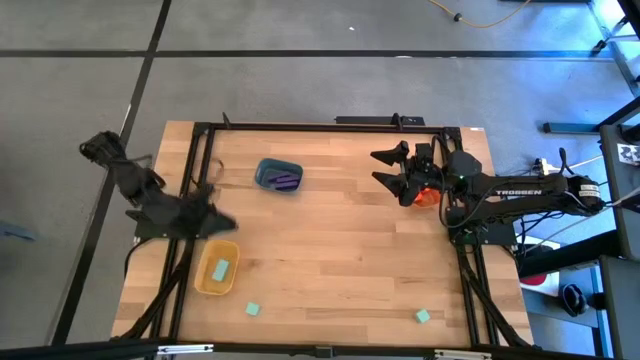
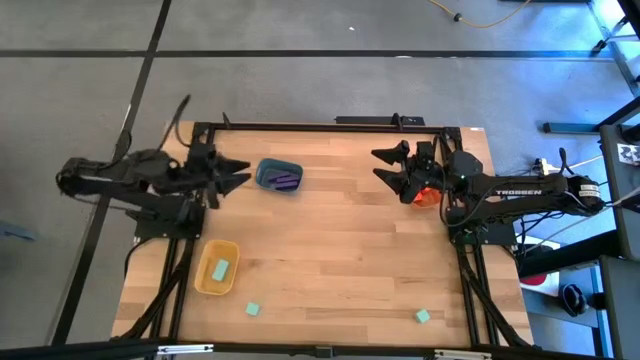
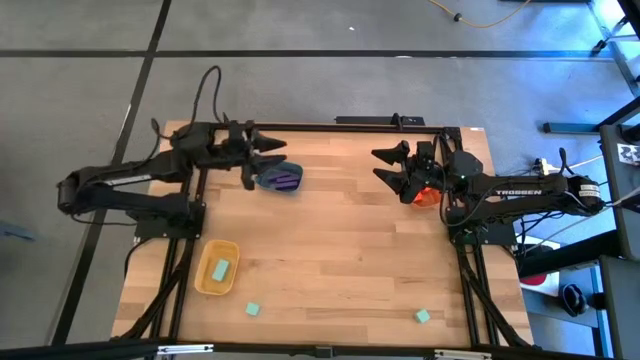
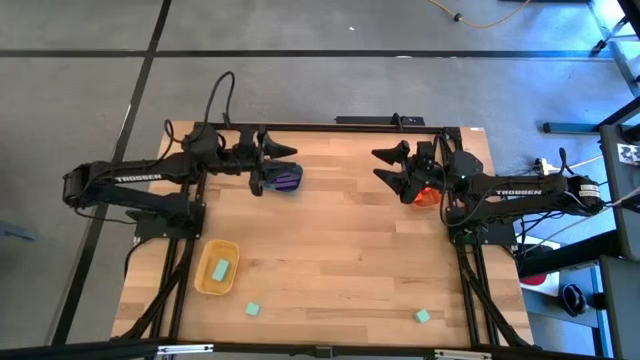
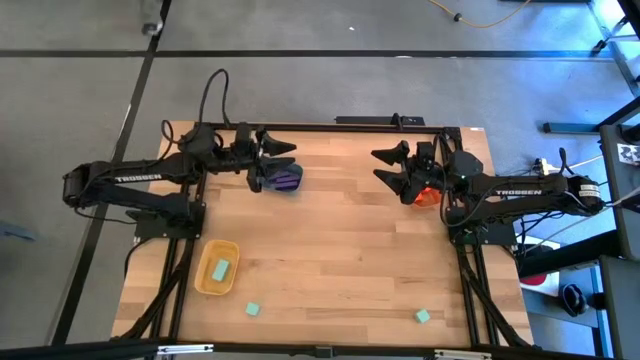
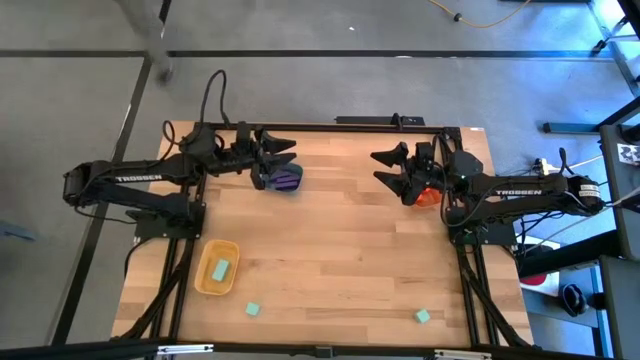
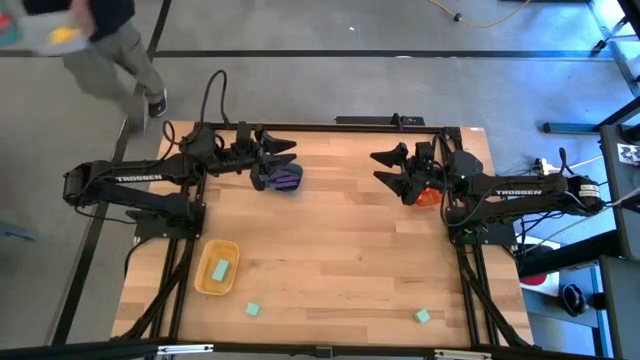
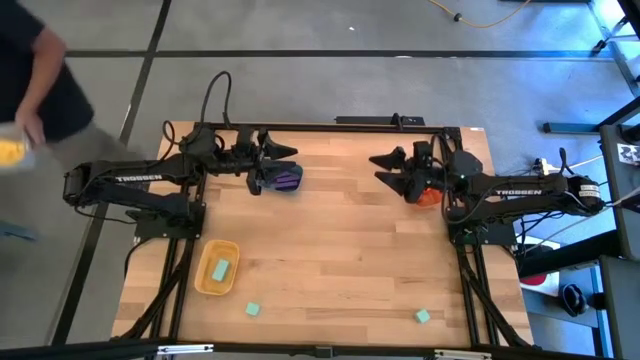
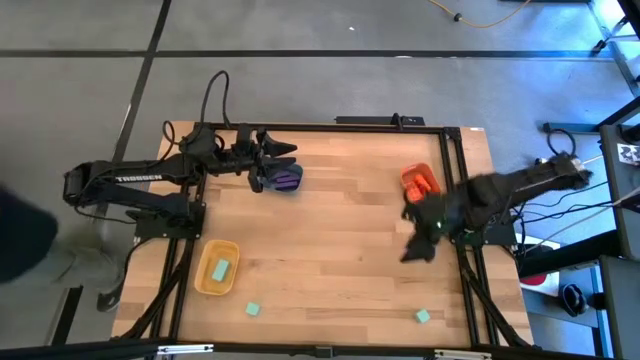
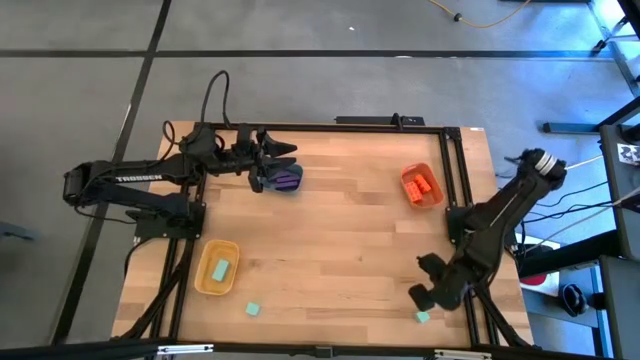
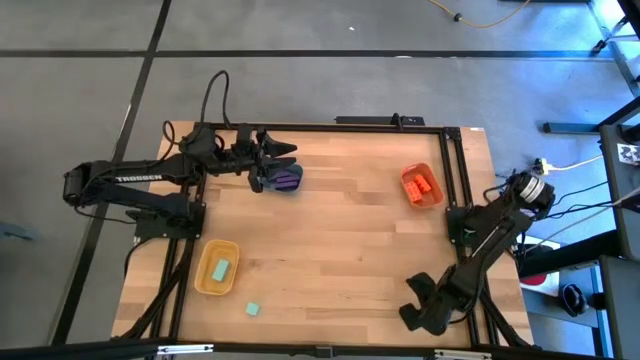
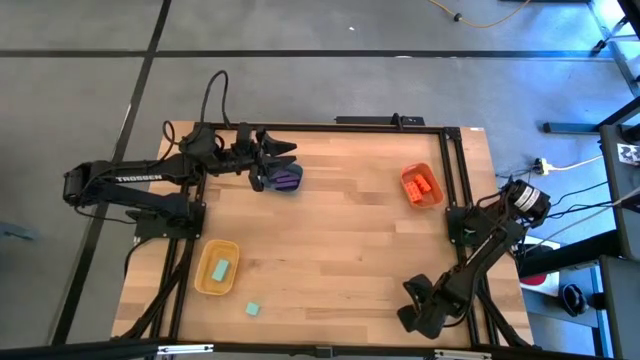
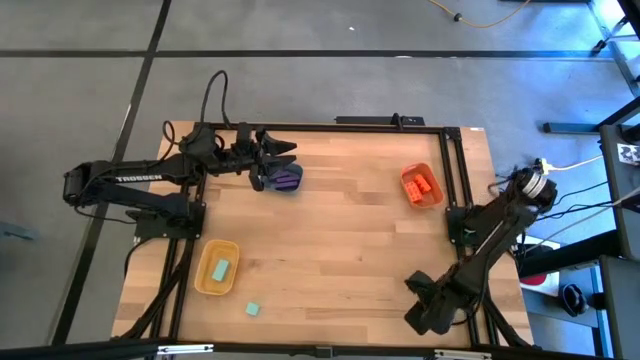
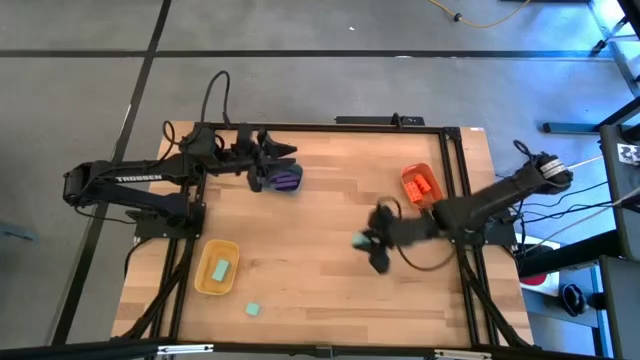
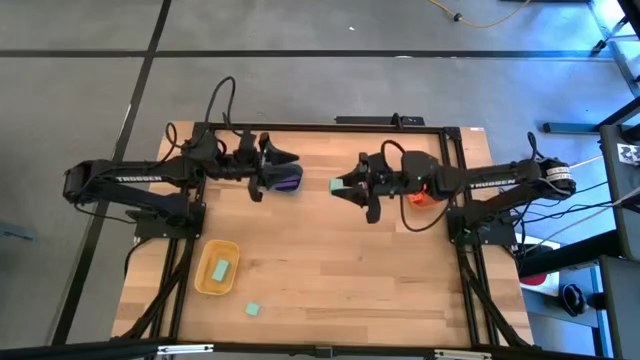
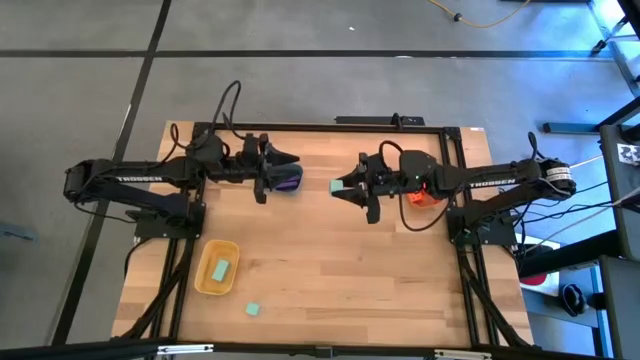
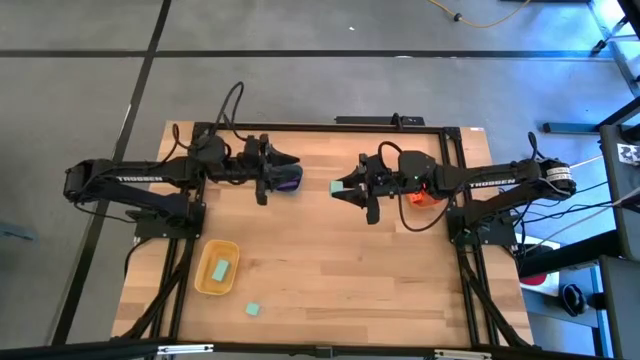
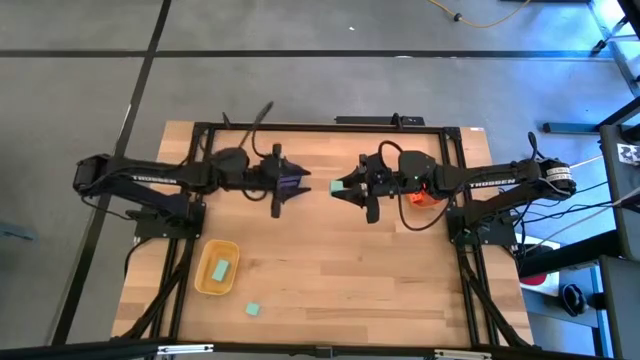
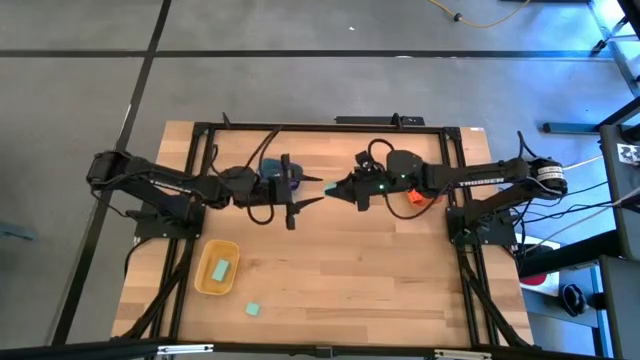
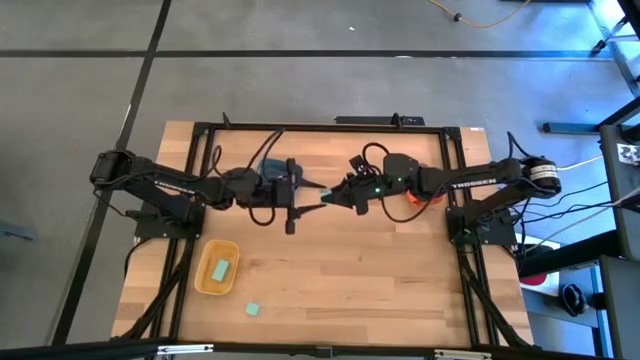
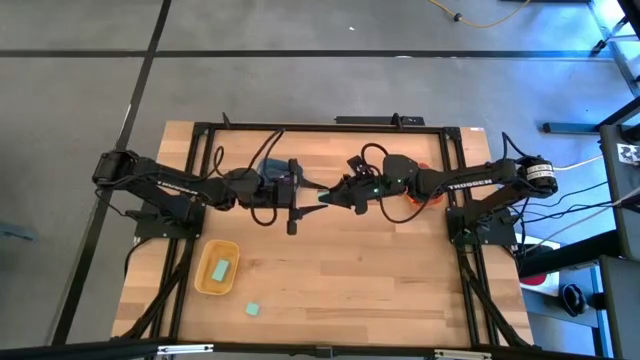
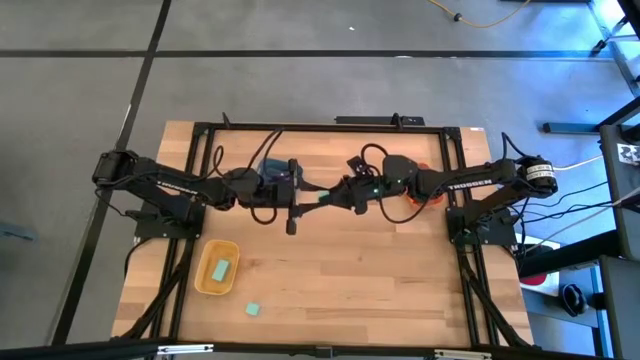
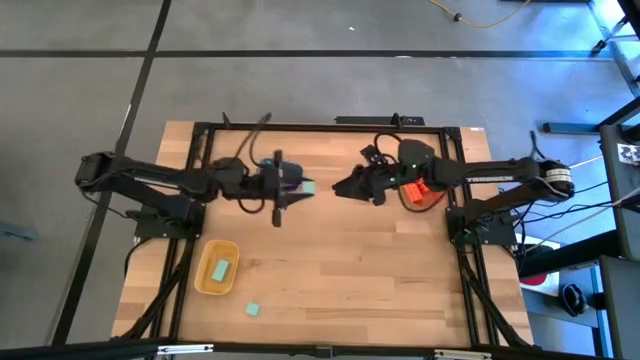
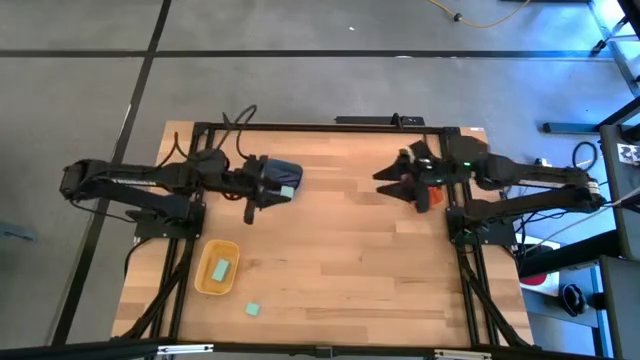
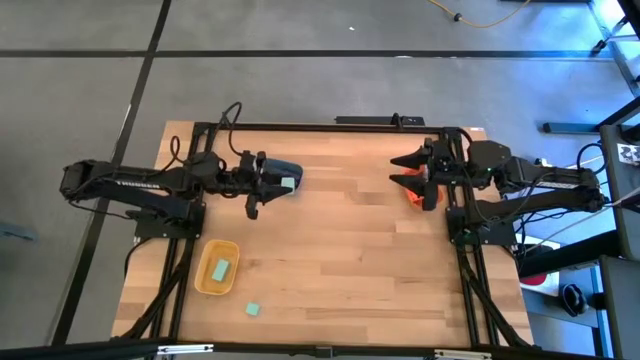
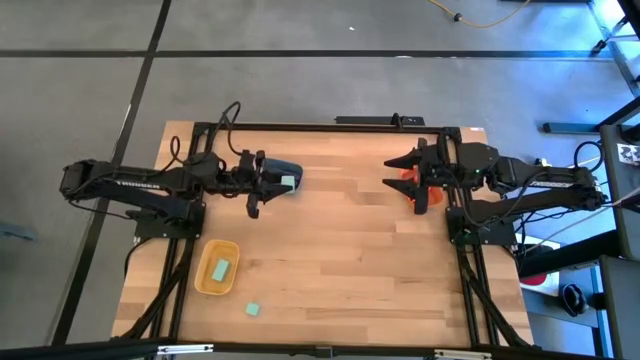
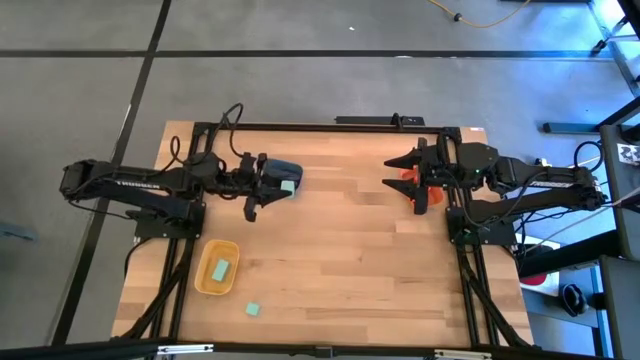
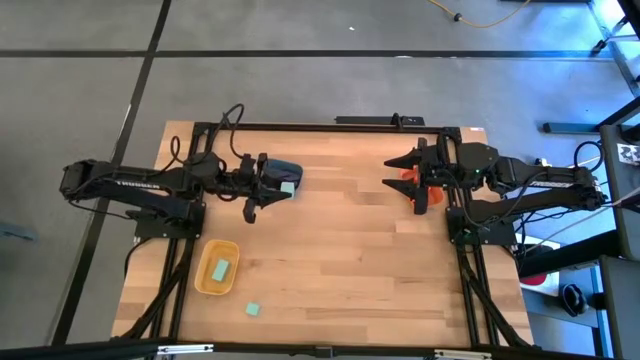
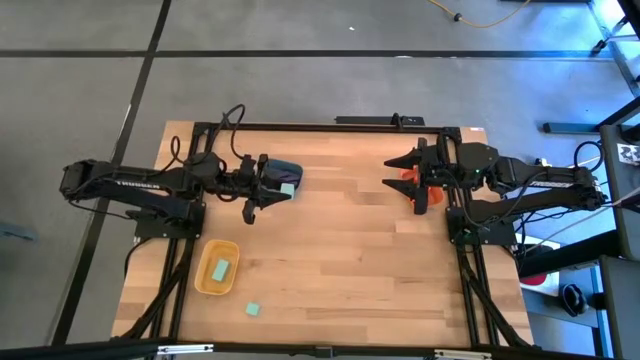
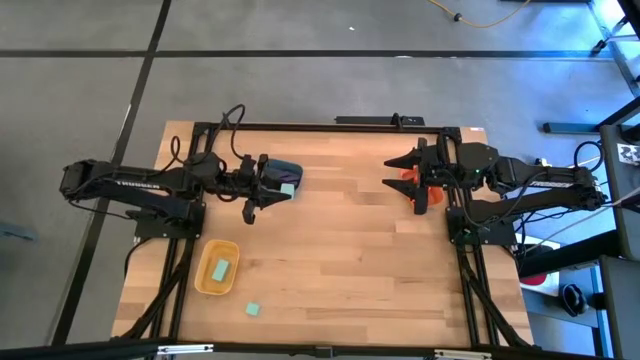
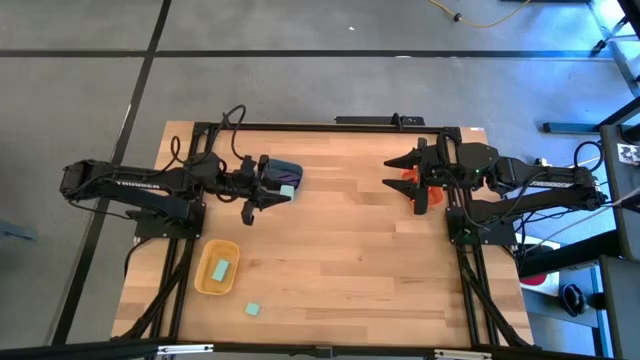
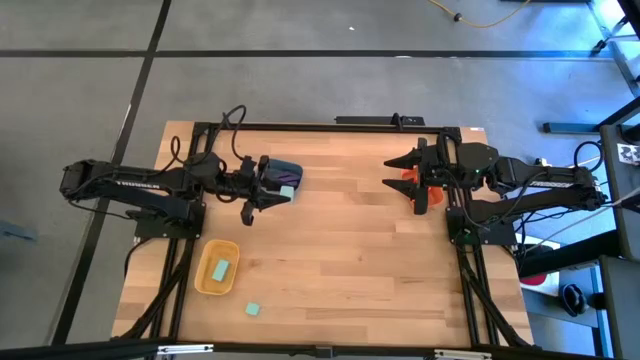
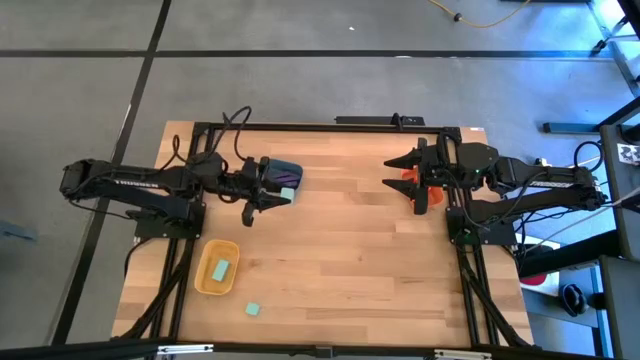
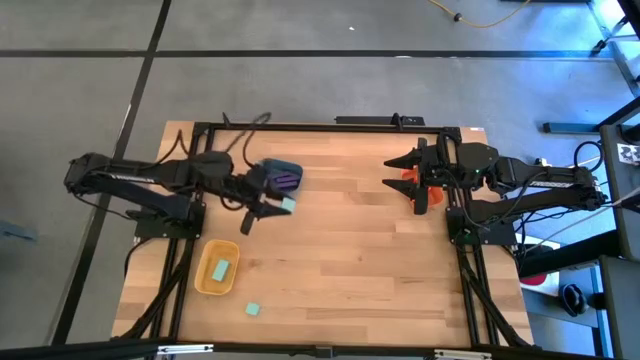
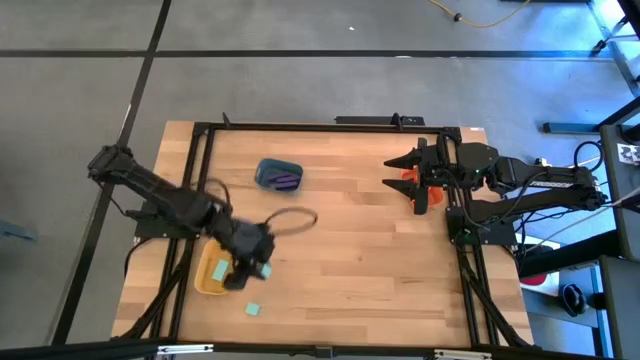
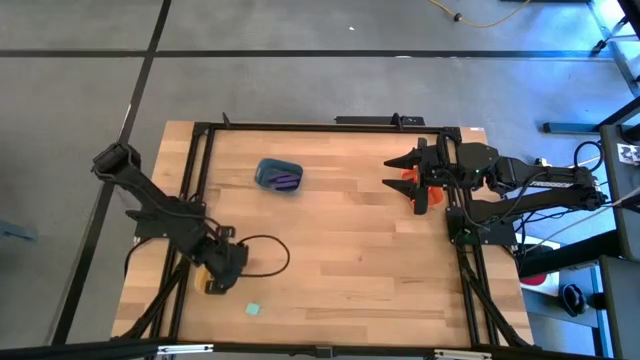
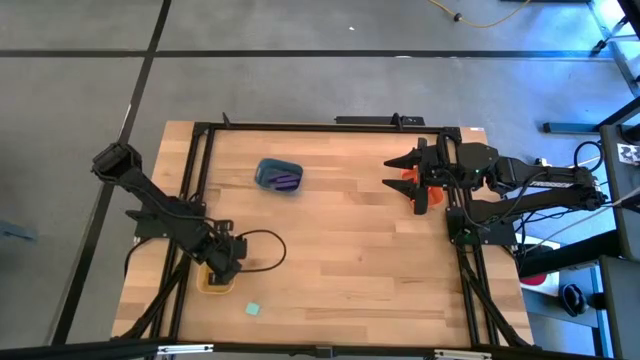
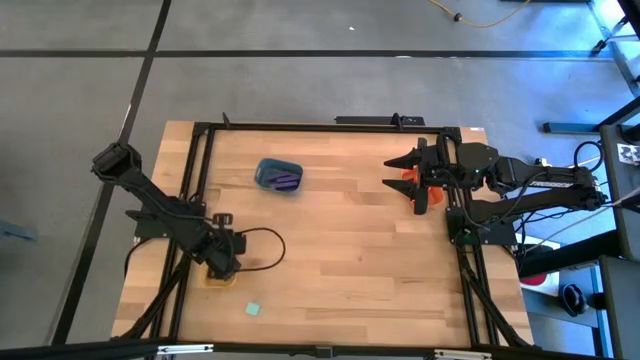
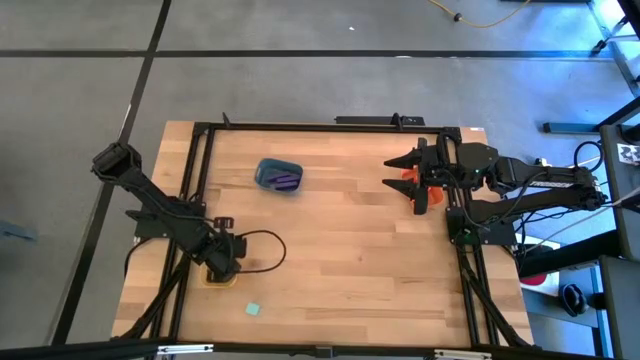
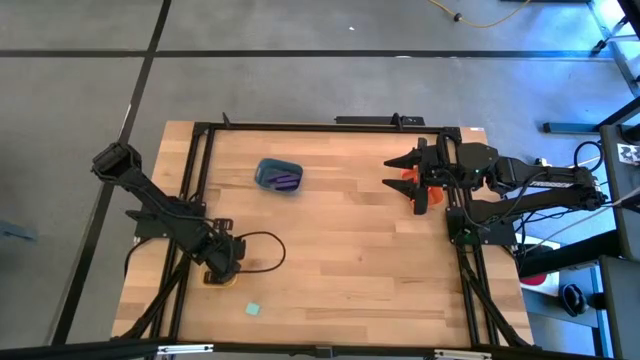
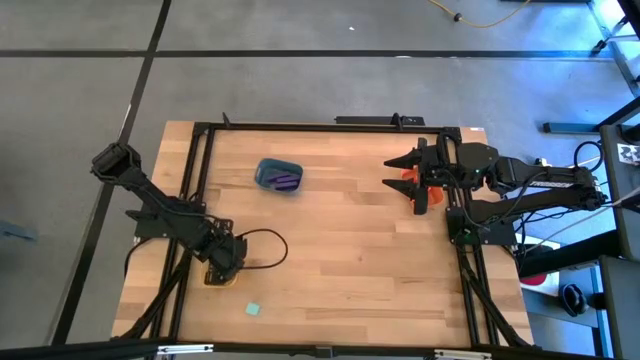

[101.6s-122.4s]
Task: Sort & place blocks by color
Put the right blue block into the yellow bin
